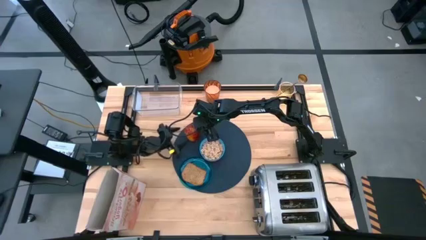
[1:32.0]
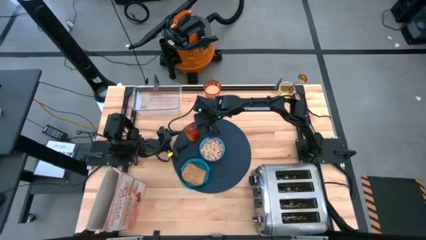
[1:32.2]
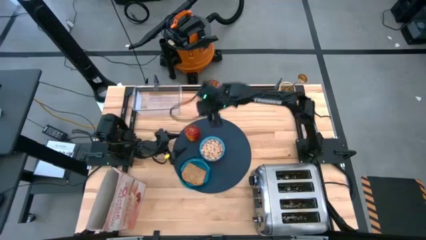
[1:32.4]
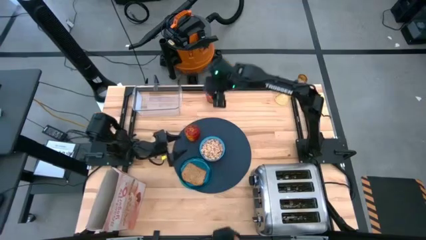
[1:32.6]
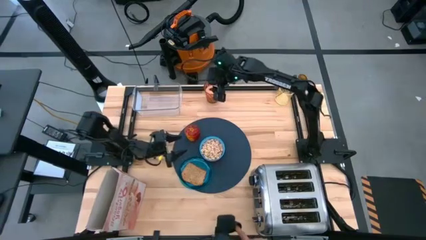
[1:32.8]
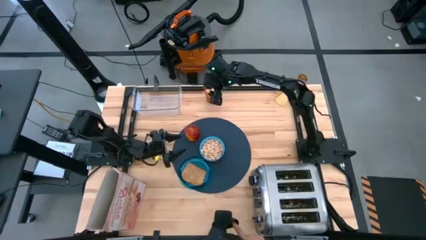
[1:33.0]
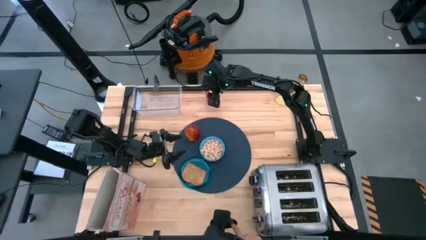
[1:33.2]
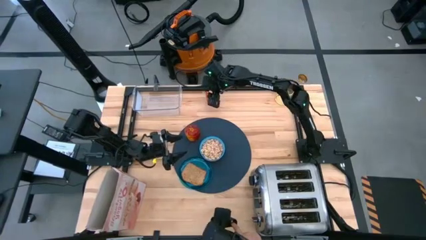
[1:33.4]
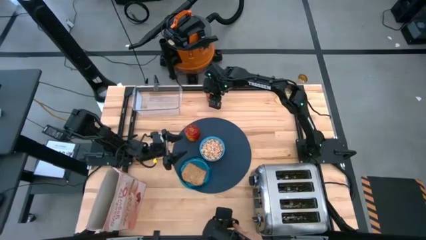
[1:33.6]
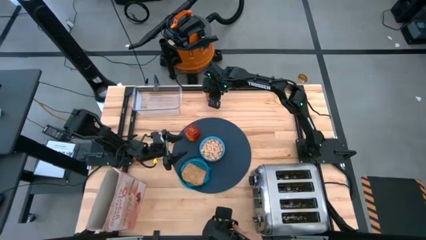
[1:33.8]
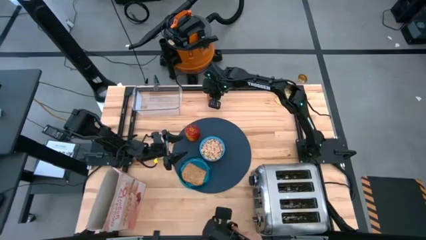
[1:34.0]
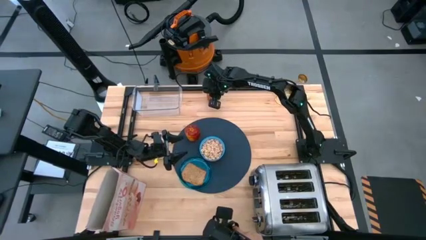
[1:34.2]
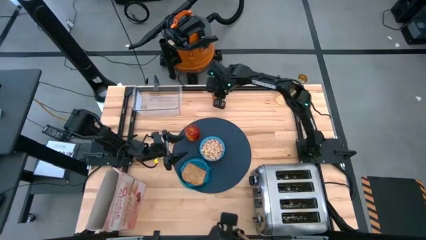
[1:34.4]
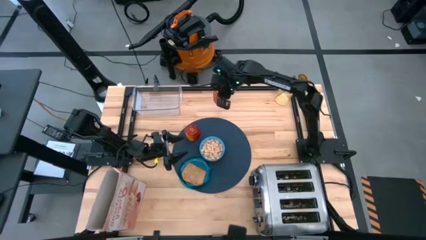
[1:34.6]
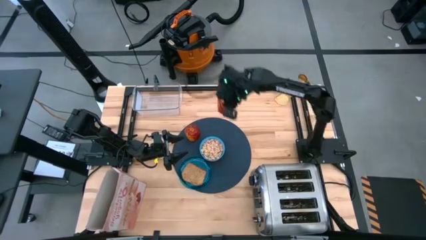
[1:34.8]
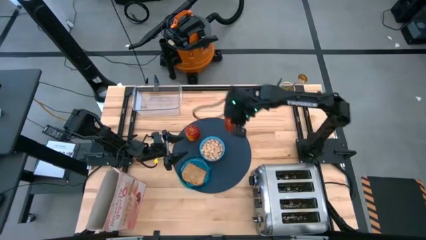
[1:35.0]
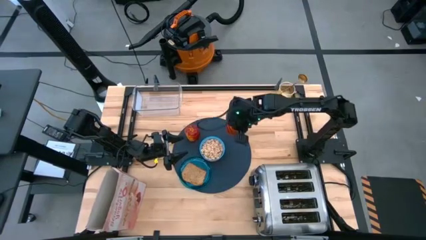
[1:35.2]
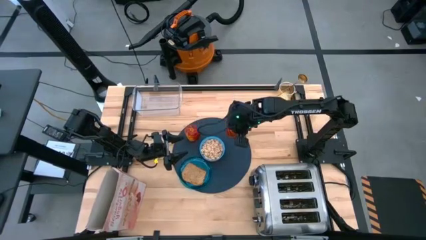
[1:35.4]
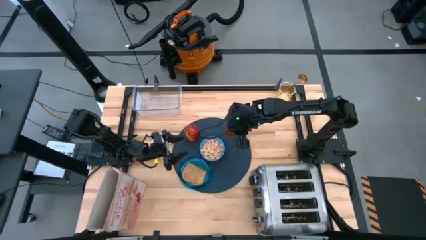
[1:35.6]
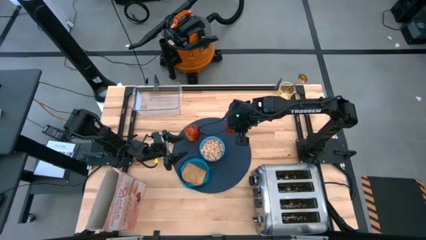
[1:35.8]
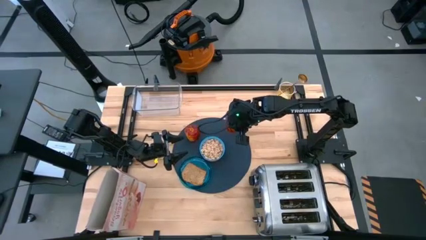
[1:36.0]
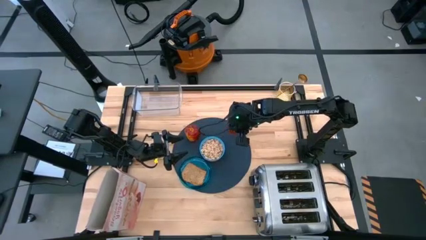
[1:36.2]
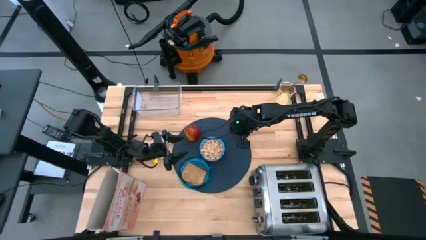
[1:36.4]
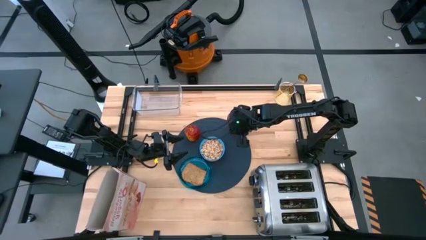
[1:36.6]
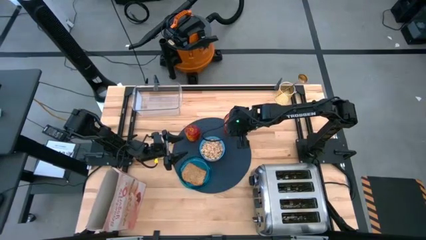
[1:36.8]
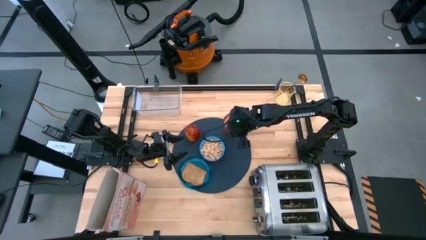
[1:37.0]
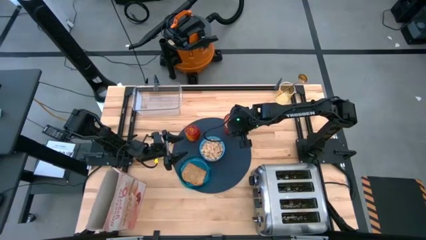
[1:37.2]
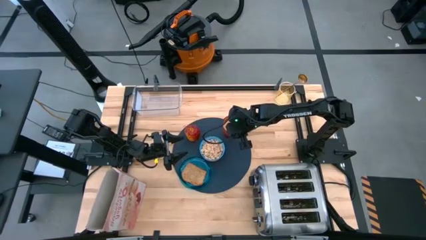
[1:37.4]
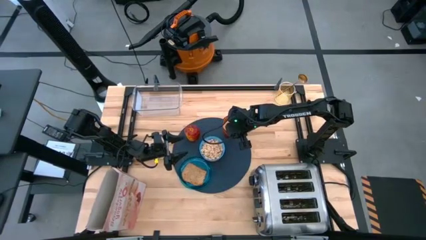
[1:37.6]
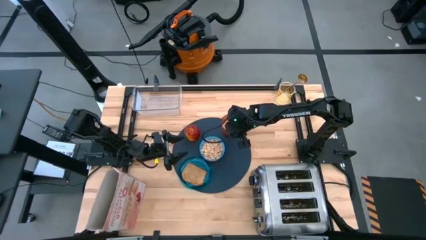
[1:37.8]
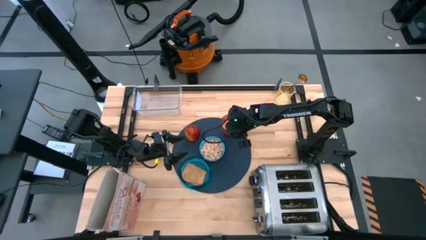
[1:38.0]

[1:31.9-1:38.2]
Task: Arrange a breakfast setting
Put the cup of rice grain into the top right of the placemat

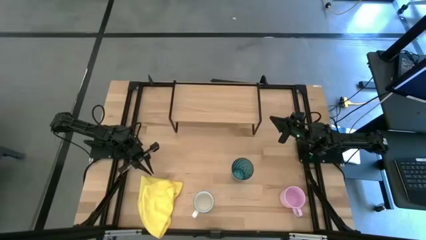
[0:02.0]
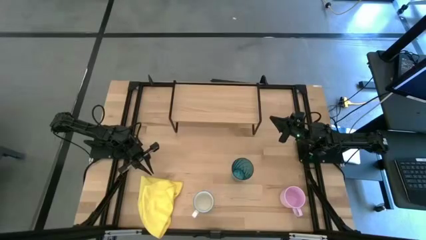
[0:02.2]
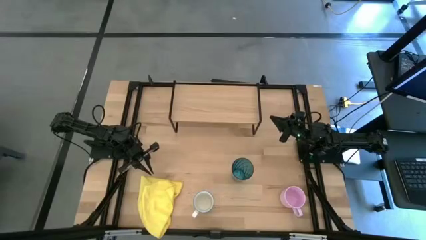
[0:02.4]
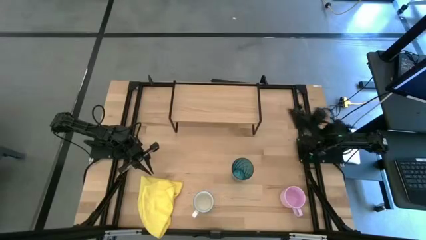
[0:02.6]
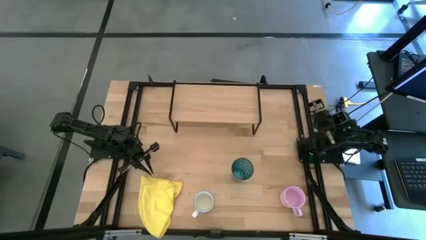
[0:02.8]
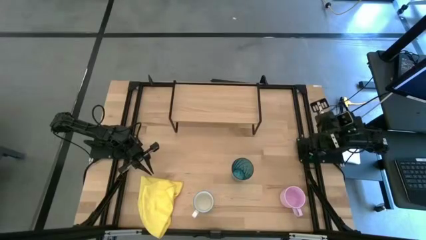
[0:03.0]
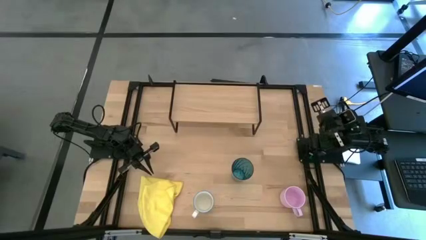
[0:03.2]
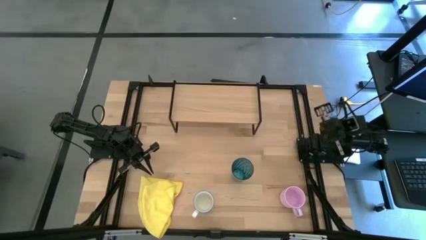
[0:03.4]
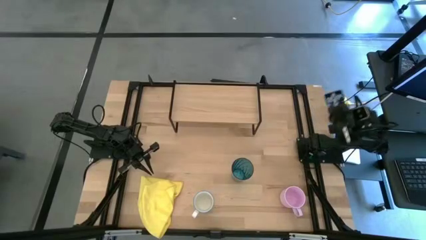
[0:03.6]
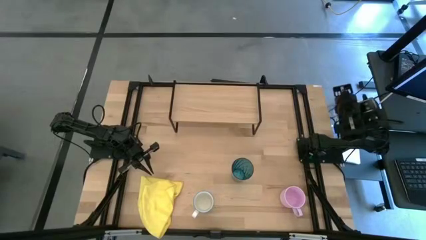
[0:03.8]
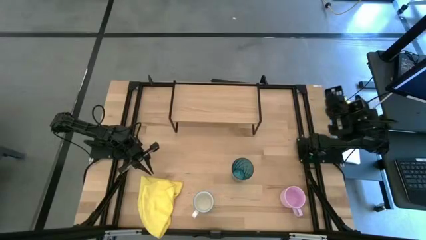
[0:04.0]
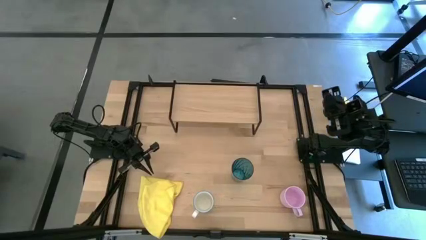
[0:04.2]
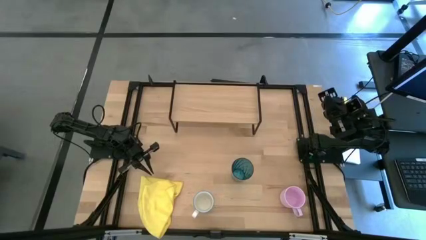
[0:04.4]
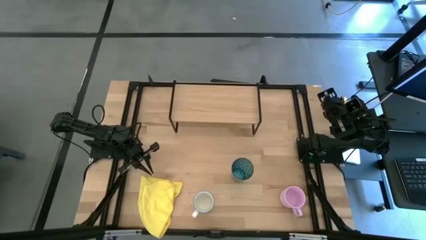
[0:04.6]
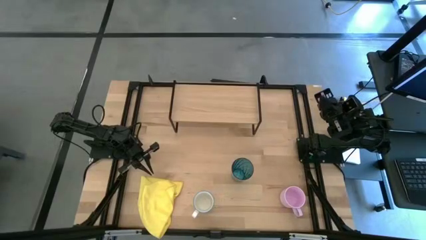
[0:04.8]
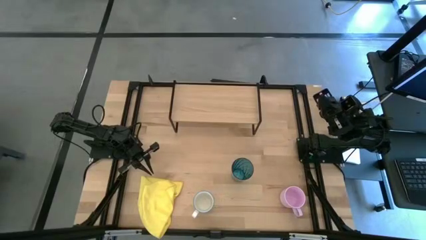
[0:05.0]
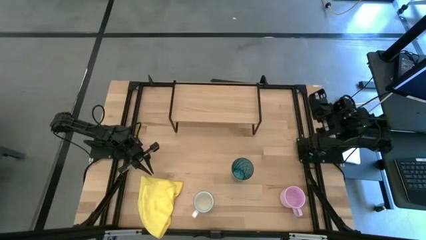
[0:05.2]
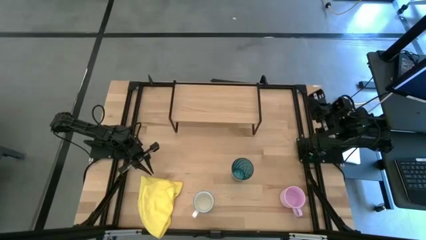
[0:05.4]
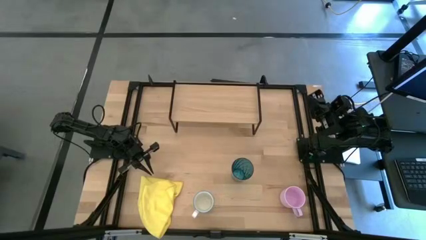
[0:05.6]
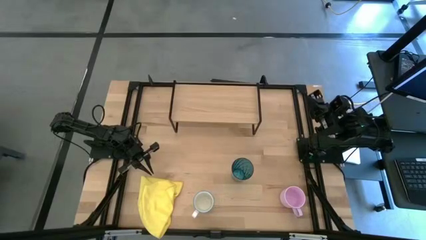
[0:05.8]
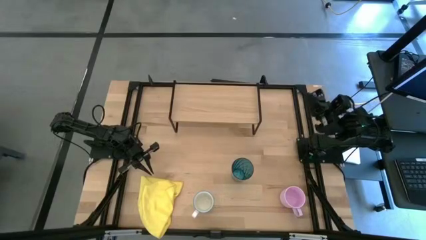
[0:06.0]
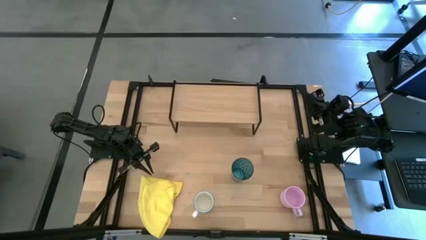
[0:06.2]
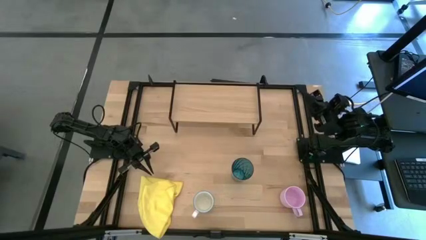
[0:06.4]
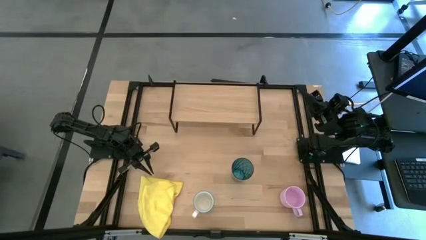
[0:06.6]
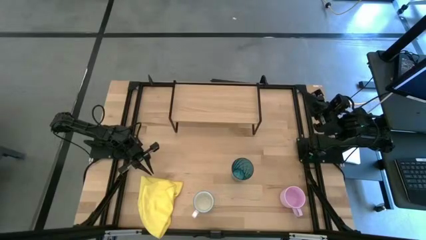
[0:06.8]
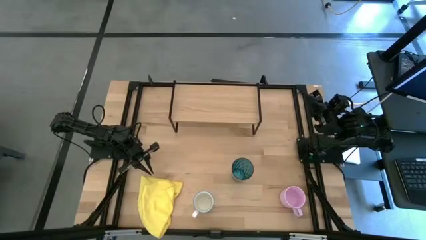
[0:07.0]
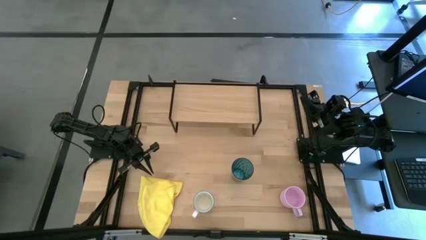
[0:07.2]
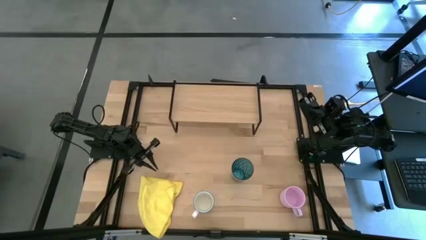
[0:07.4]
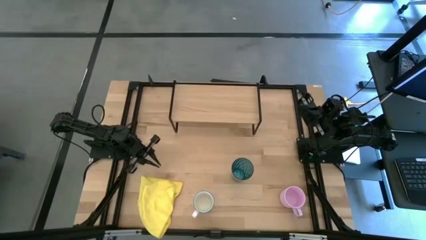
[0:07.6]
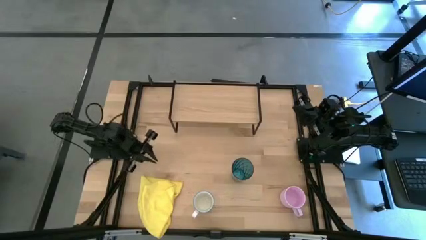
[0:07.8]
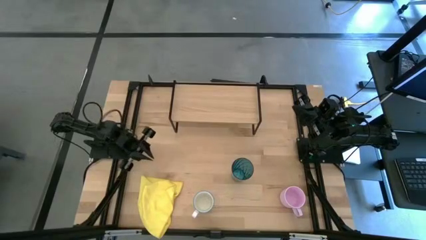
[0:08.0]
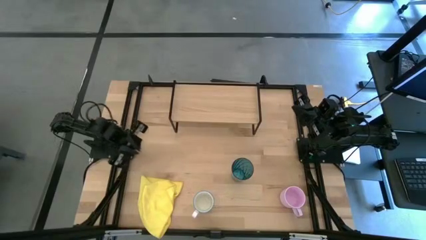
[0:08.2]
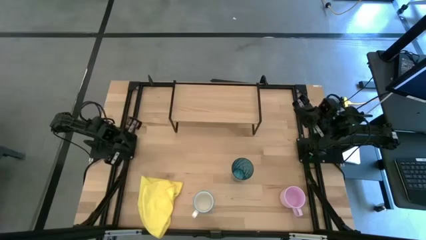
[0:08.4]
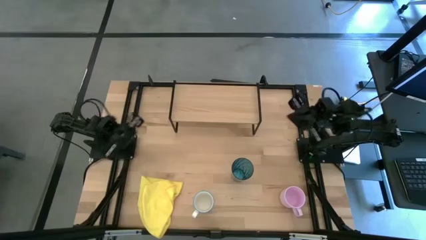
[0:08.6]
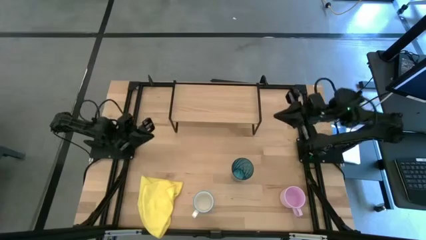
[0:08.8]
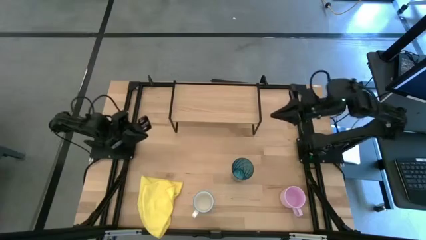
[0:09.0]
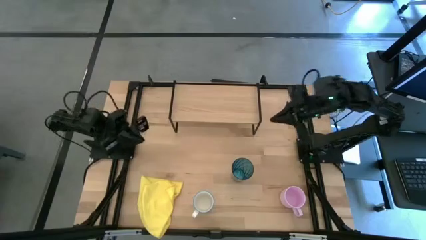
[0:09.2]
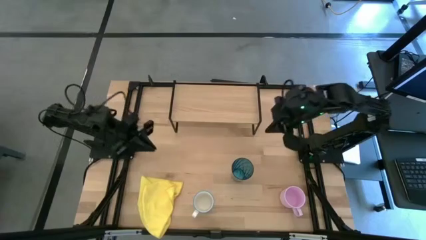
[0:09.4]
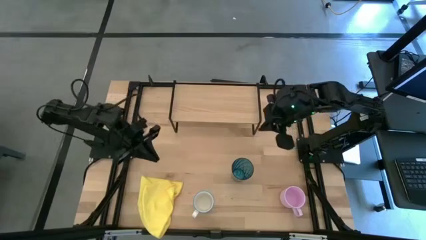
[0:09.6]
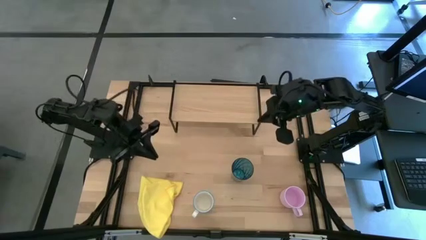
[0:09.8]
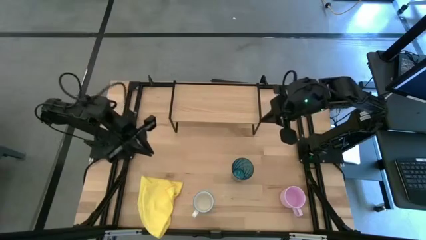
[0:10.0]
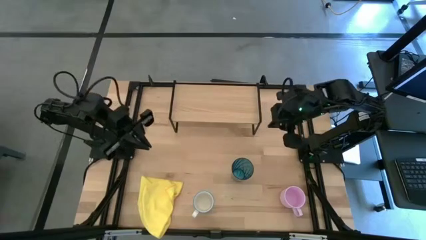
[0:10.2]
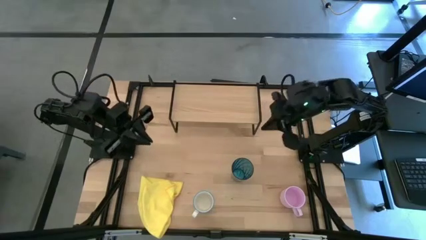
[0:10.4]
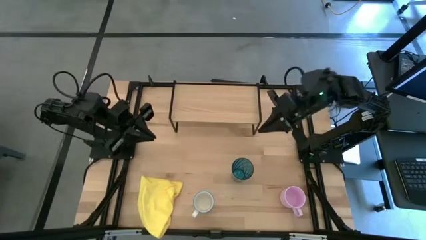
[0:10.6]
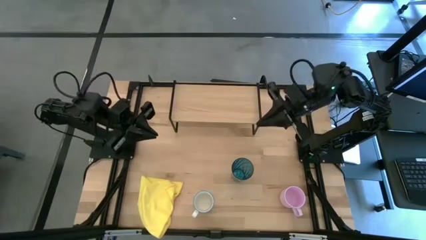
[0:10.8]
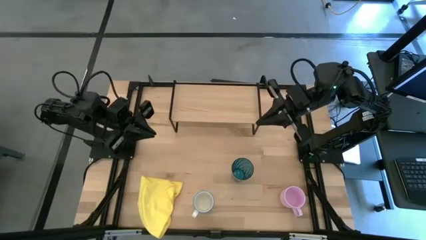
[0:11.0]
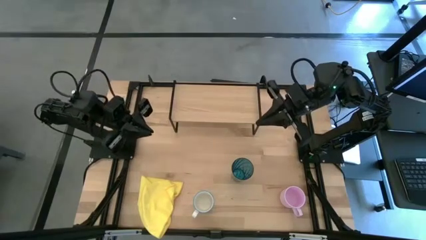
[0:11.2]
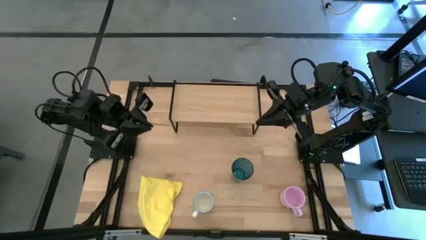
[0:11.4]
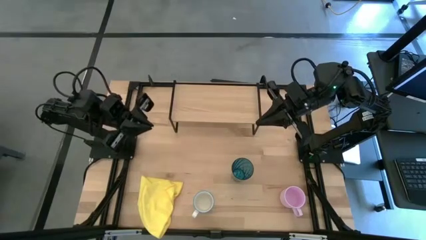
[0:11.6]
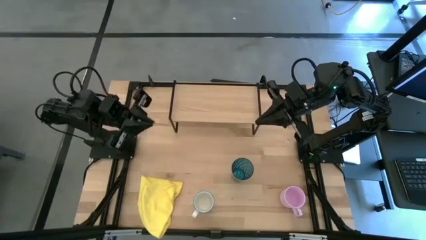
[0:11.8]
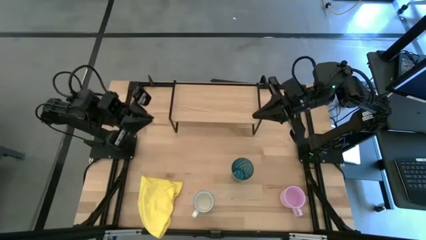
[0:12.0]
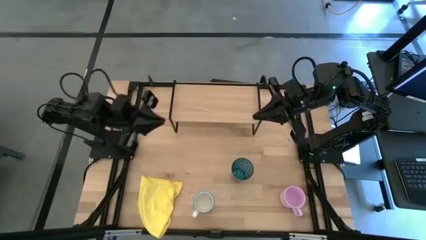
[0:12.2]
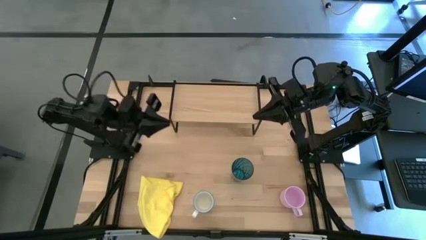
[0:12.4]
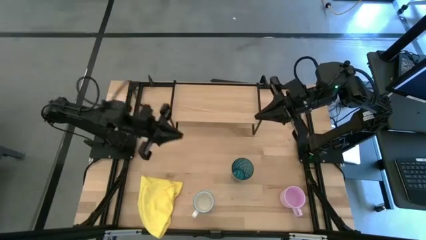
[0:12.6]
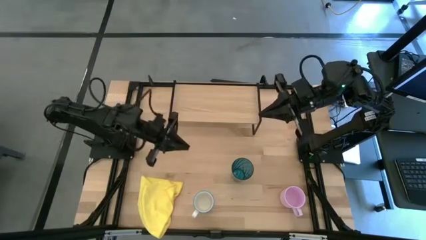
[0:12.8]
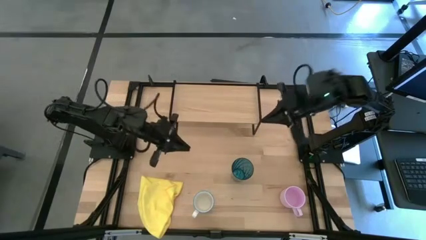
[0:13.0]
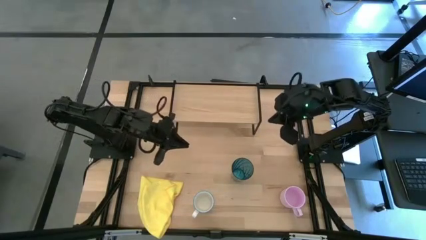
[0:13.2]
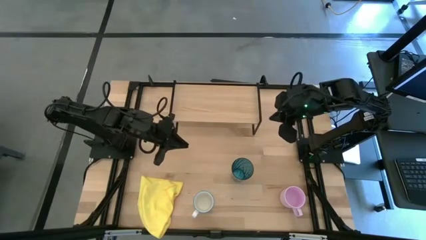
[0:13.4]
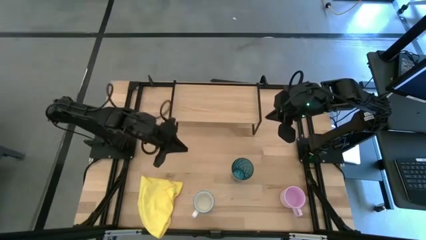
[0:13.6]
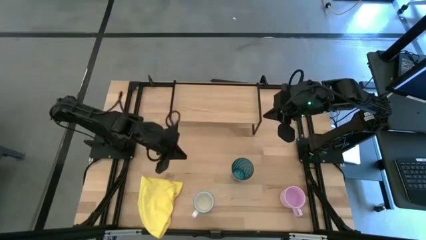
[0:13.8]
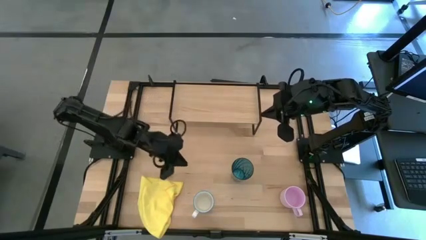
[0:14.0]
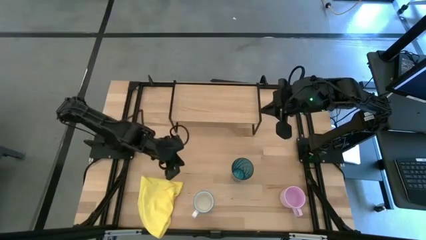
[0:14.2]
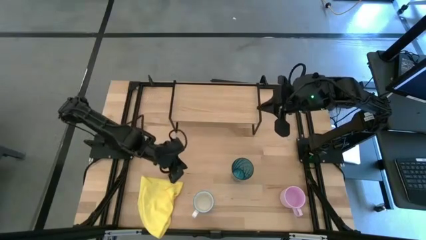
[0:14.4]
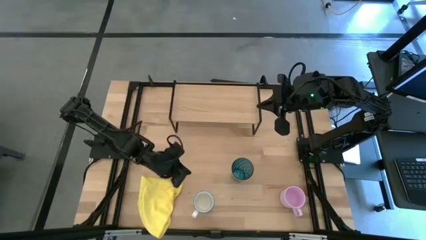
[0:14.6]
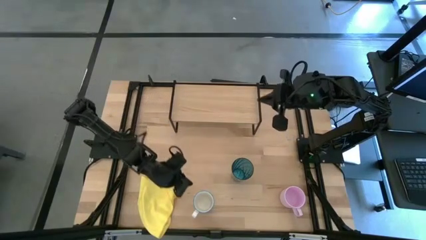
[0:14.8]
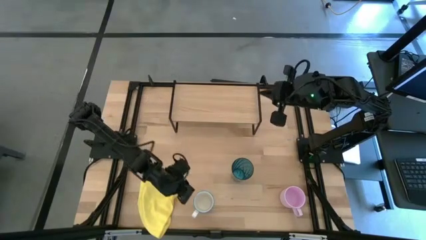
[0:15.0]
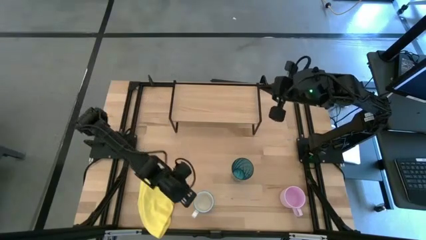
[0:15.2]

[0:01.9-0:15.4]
Task: Stack small to large cups/mugs on shelf
Put the white/red mug on the shelf
